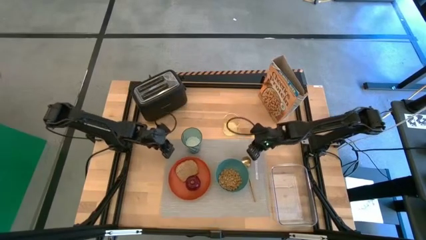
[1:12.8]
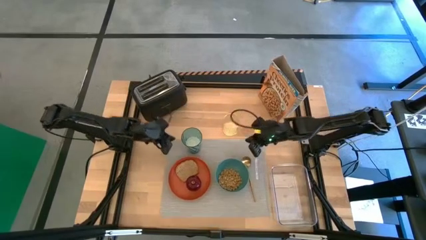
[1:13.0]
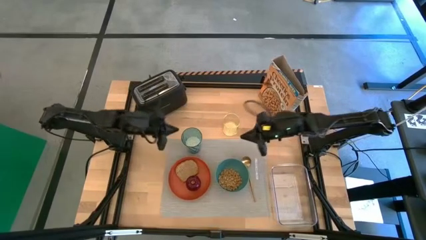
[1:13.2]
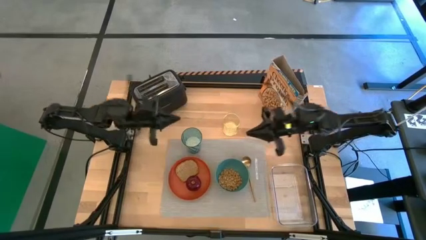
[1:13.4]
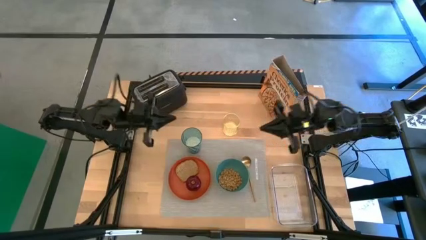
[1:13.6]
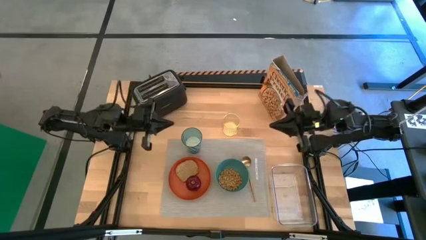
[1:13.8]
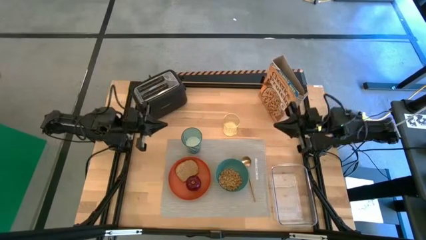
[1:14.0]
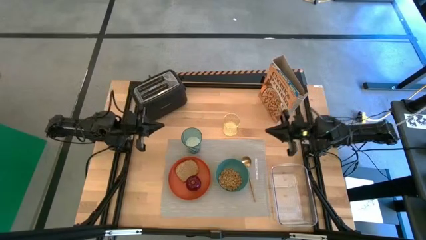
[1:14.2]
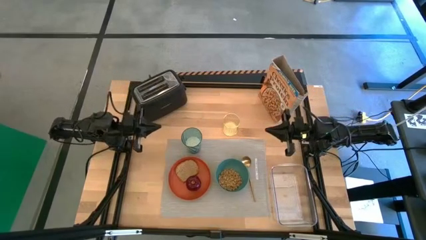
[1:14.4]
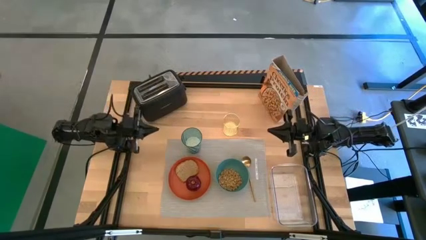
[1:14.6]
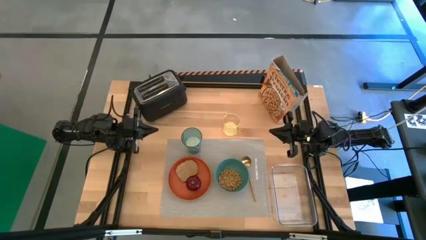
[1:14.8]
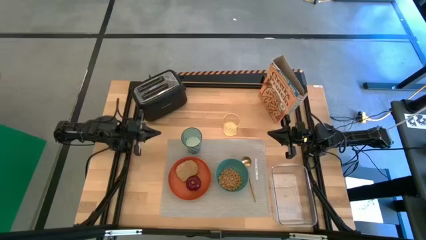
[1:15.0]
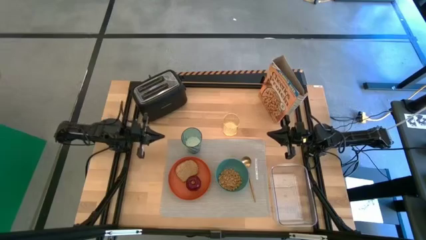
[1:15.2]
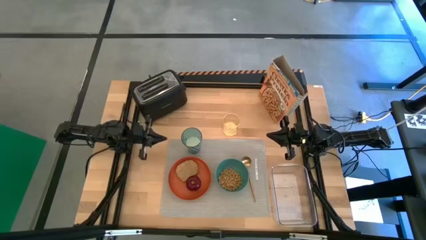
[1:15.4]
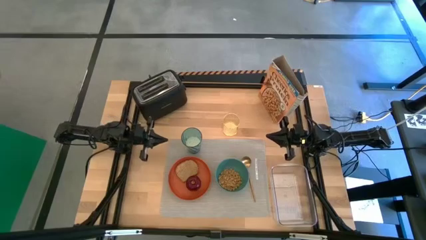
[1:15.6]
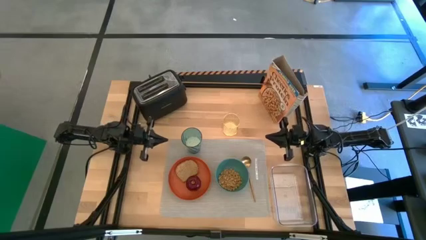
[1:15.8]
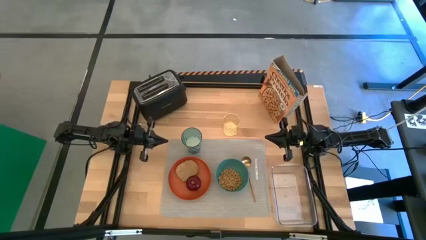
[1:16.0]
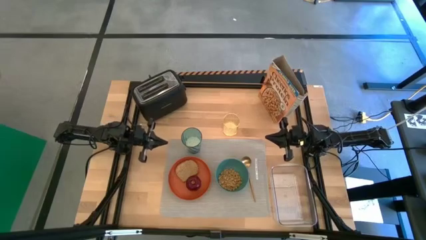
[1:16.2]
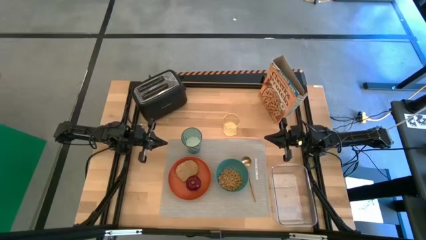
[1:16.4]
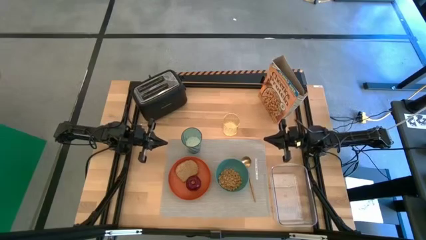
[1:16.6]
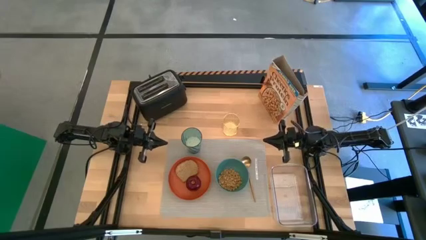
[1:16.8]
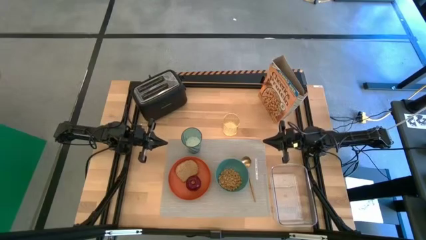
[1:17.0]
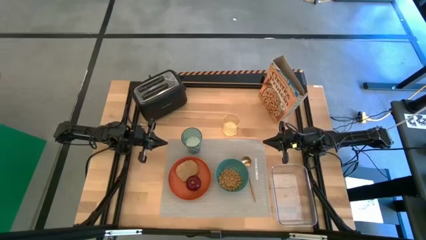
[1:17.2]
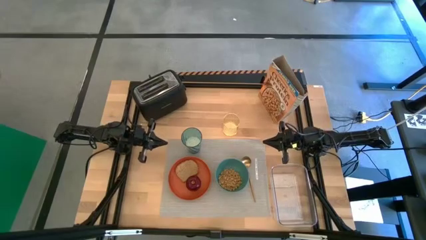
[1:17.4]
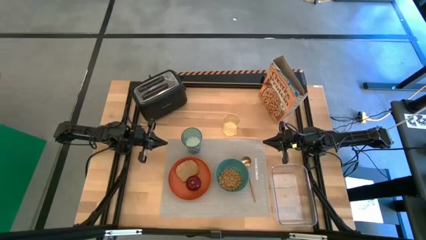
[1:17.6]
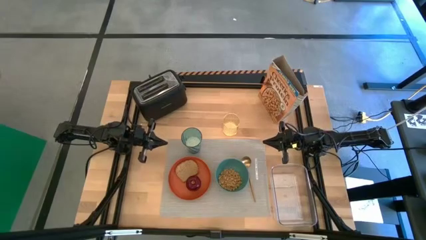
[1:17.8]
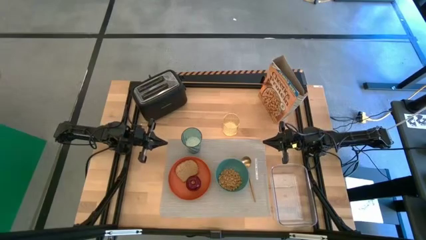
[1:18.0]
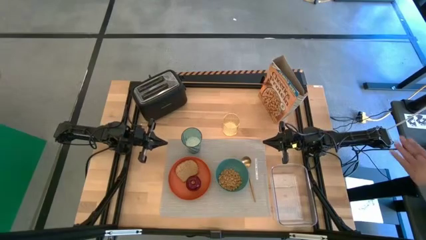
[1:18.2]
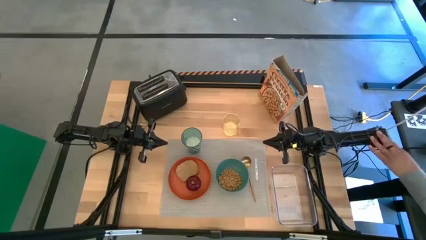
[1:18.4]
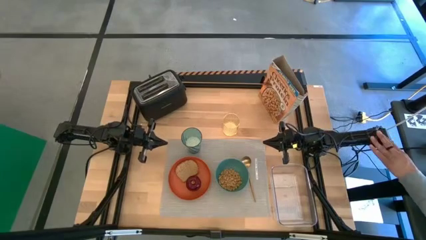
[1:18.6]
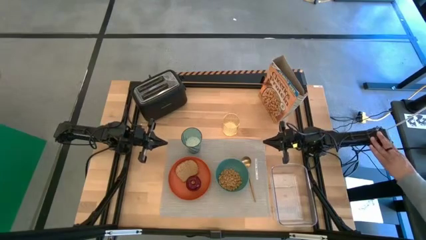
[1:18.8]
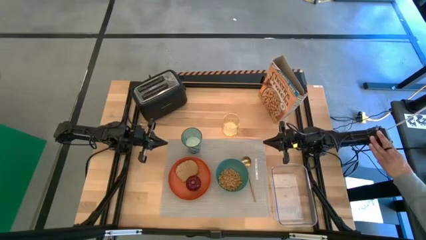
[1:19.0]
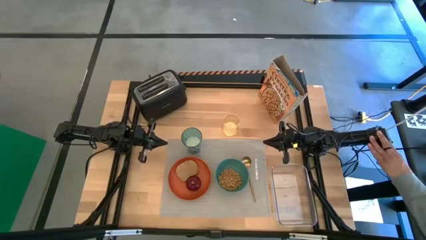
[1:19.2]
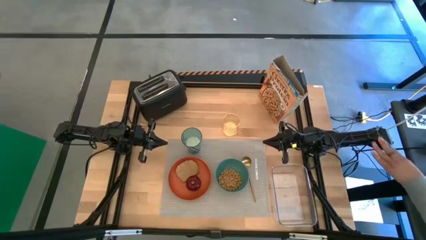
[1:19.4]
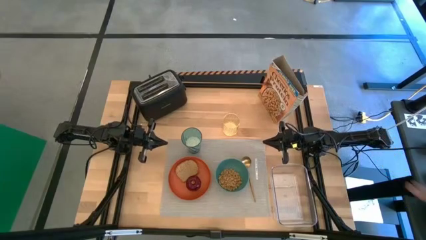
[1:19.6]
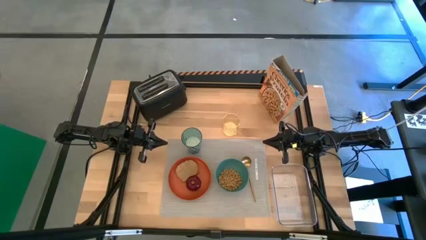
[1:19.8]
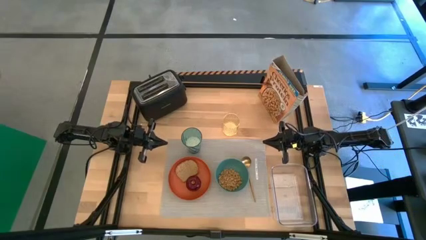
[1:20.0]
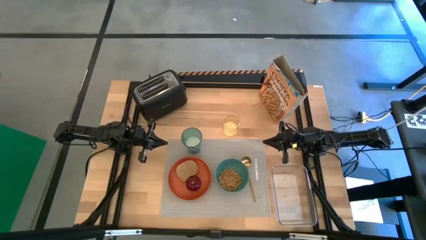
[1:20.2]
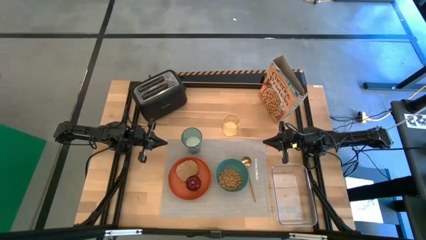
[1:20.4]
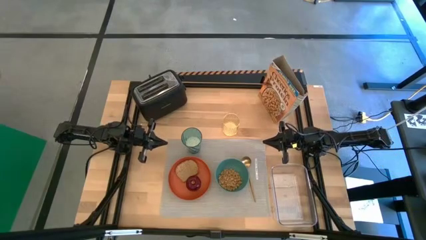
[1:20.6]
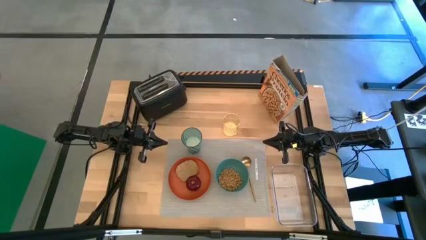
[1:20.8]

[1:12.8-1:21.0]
Task: Arrange a breakfast setting
Return to Home Position

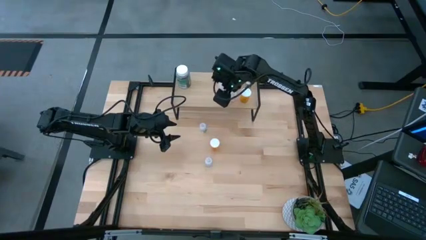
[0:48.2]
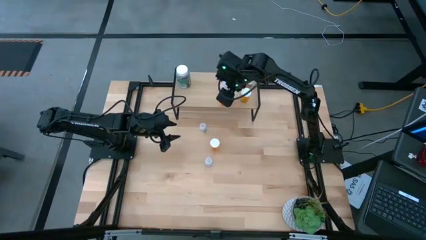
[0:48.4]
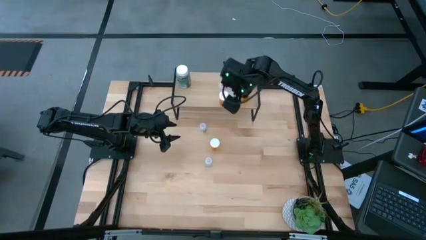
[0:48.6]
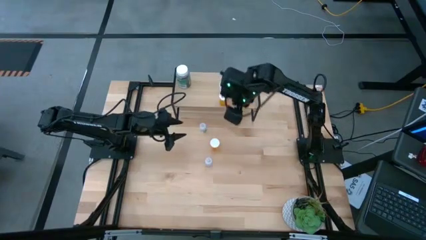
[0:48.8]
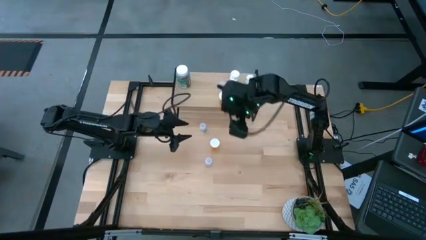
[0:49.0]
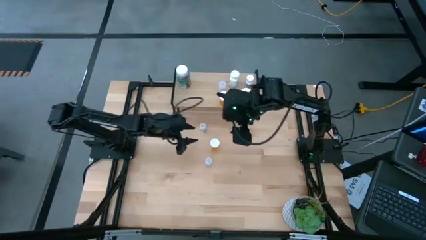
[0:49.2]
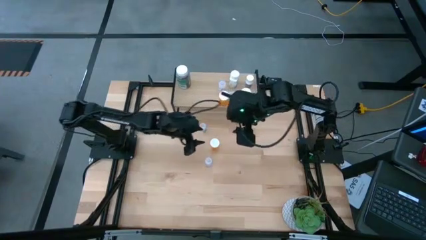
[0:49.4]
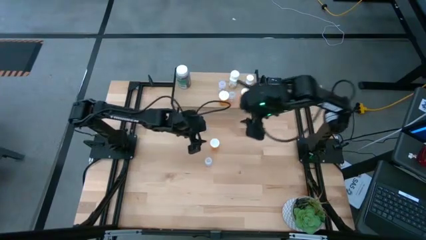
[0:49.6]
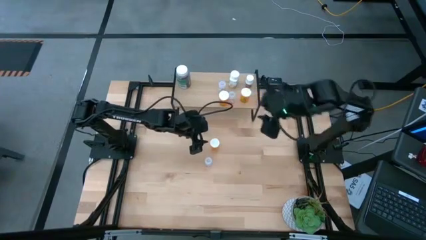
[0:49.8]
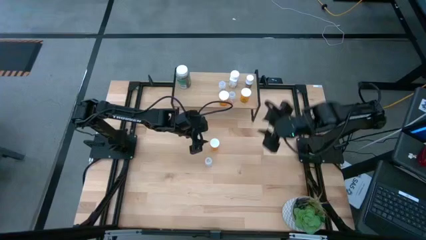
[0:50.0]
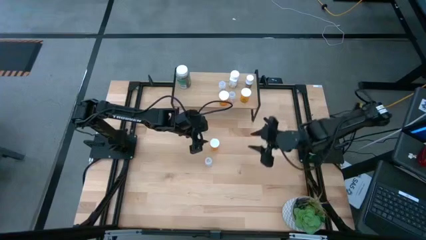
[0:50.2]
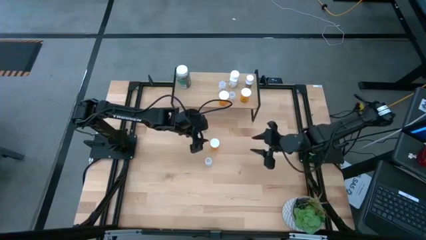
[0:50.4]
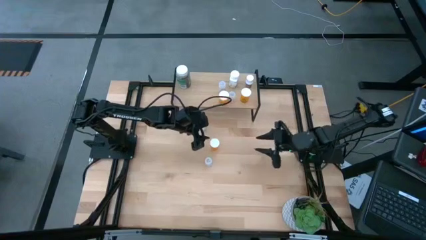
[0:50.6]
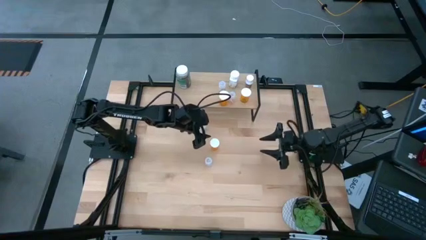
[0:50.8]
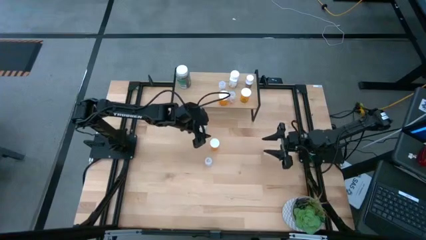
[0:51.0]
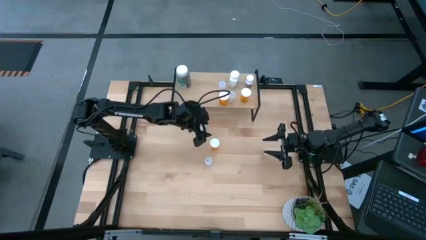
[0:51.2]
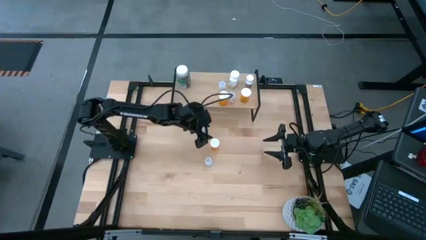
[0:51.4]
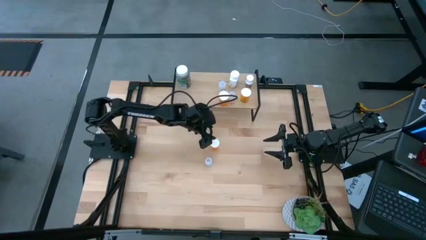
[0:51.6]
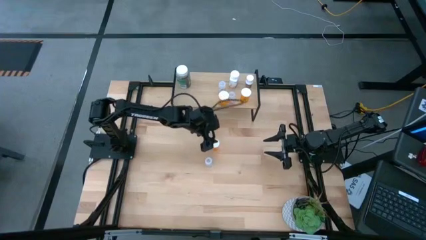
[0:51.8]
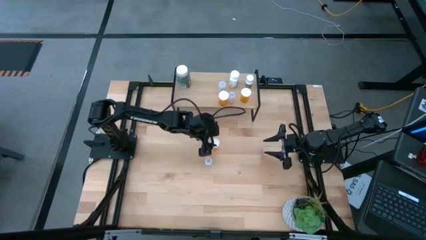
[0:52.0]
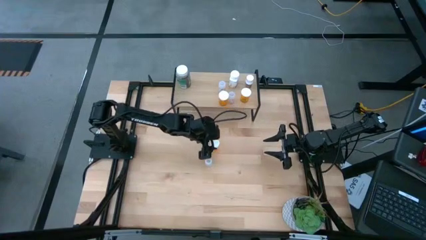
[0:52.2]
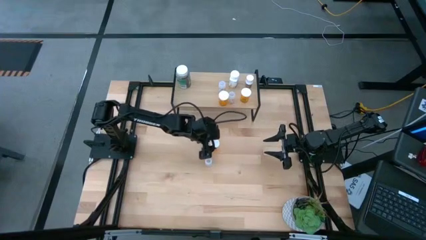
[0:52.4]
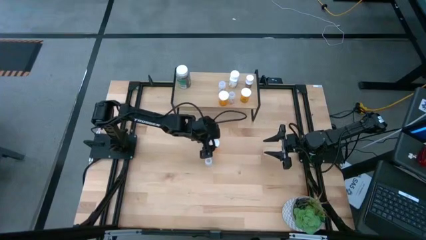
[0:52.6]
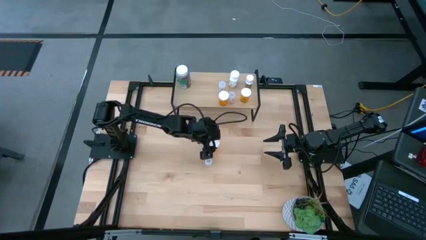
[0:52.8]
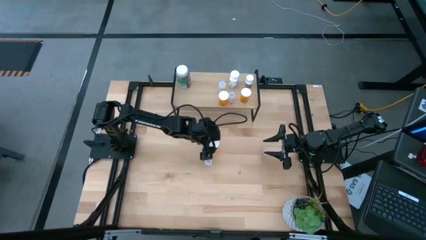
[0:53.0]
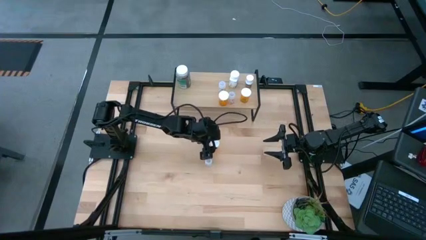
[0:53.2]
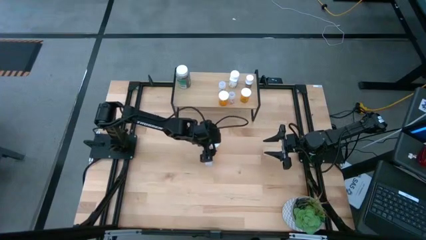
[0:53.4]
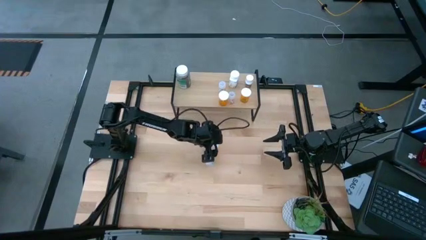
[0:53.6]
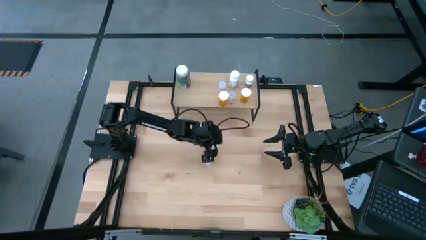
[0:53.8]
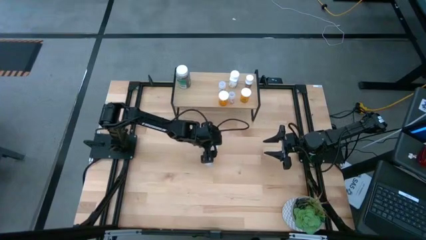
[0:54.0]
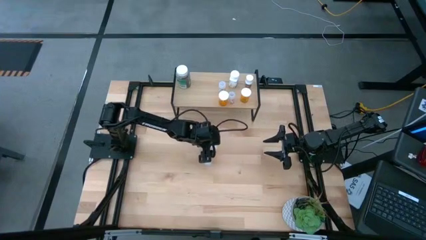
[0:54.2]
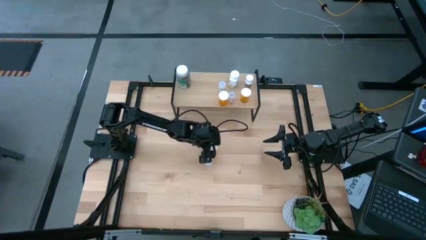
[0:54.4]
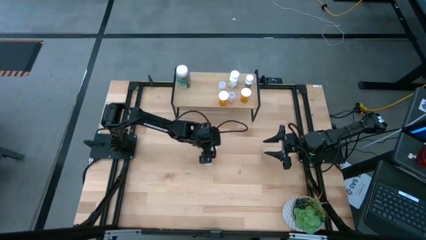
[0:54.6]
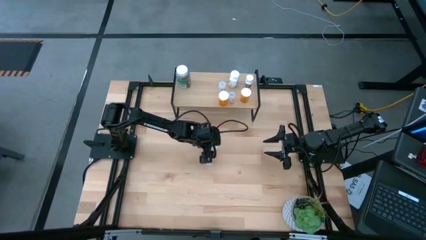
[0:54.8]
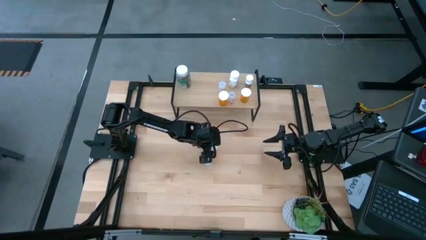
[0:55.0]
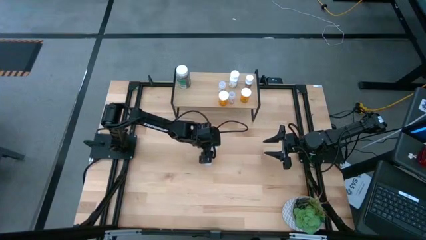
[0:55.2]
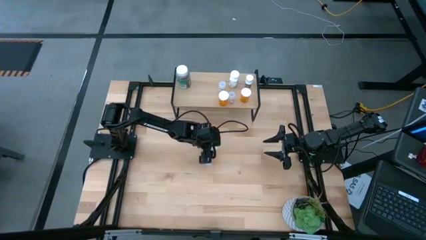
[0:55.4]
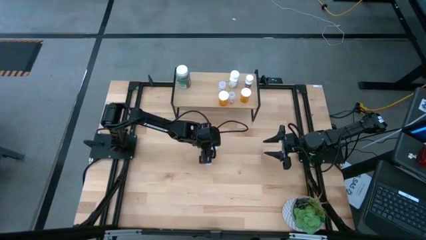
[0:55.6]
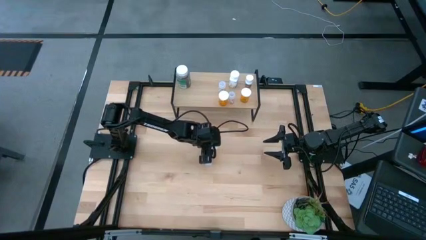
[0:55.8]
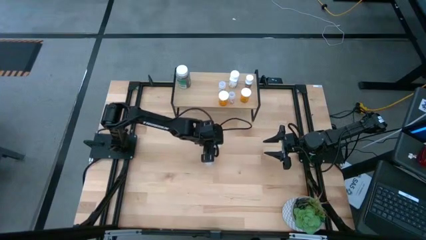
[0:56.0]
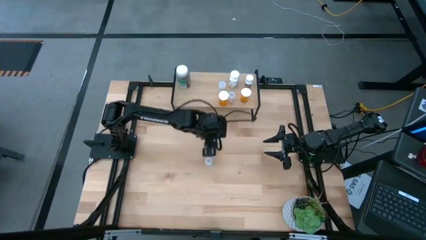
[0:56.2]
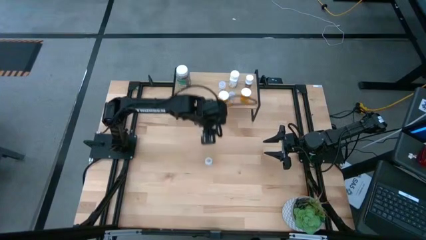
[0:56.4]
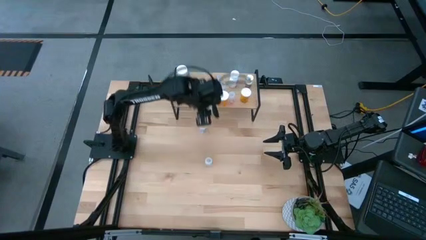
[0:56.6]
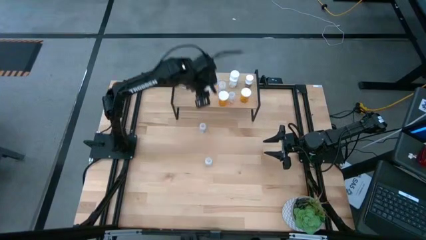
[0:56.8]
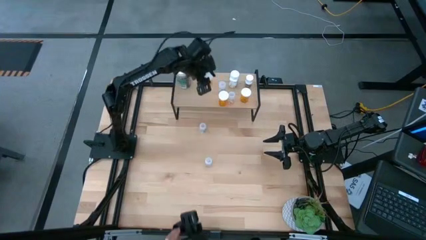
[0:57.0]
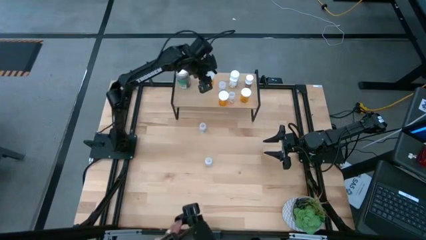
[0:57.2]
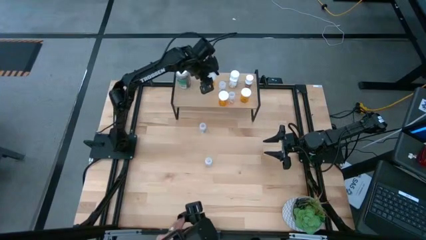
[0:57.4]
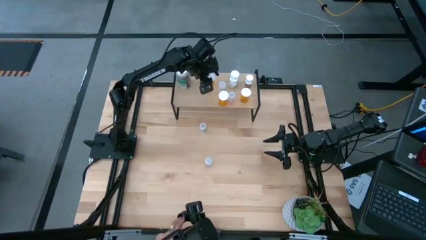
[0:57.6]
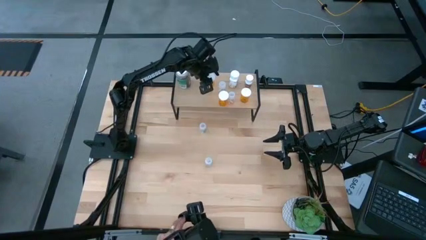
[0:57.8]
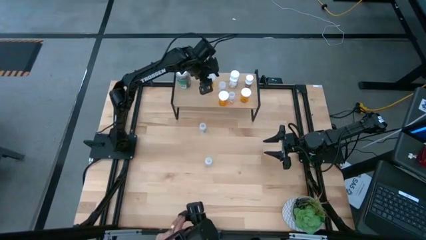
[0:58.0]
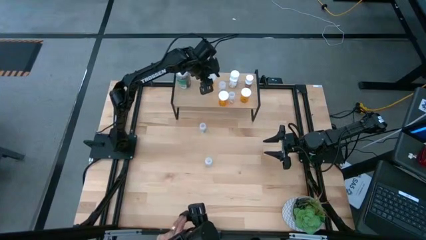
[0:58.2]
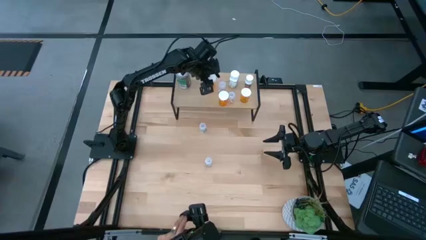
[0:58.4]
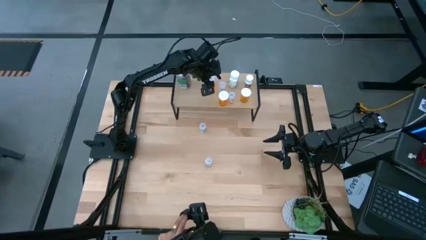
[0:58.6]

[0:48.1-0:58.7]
Task: Pick and place medicine bottles onto shelf by color
Put the orange pill bottle on the shelf
